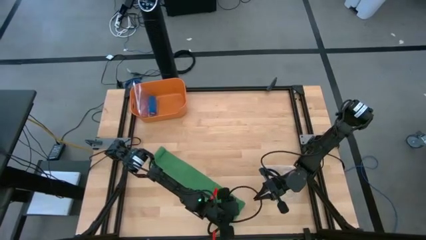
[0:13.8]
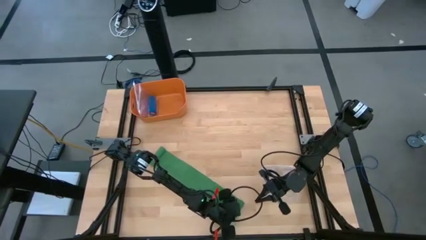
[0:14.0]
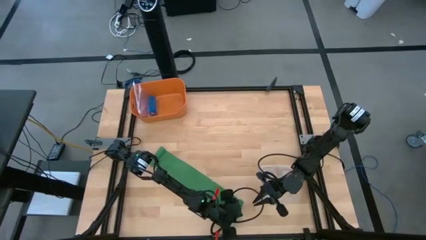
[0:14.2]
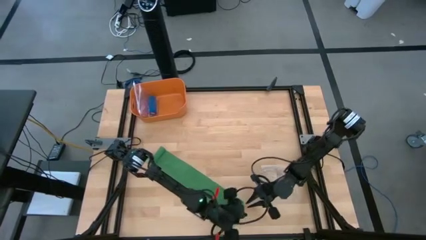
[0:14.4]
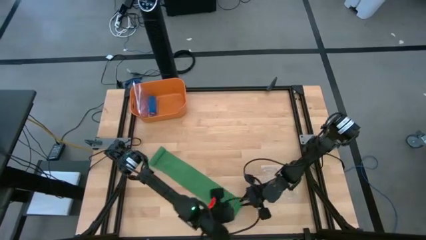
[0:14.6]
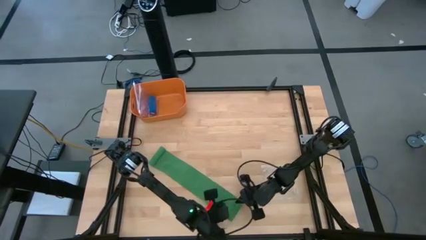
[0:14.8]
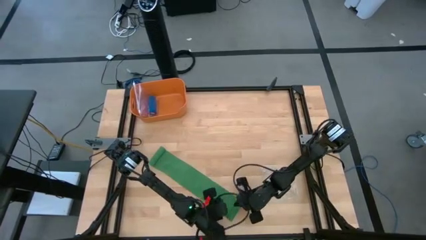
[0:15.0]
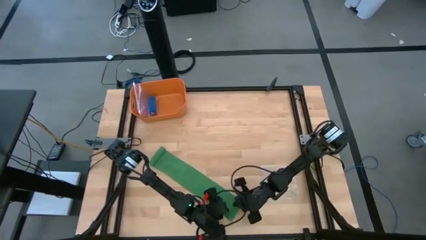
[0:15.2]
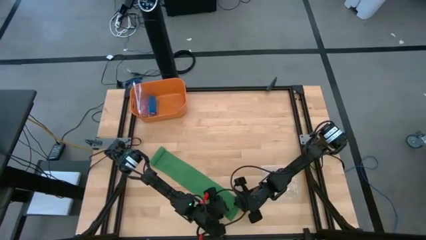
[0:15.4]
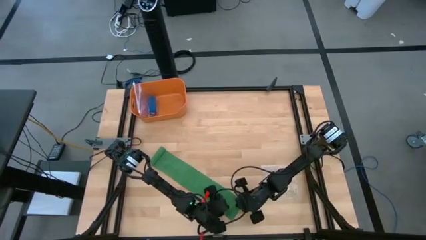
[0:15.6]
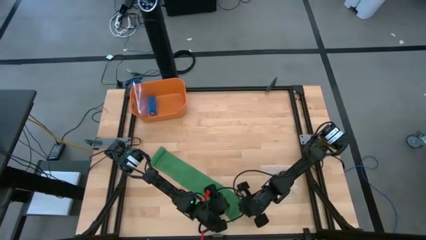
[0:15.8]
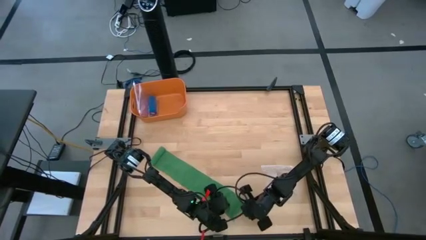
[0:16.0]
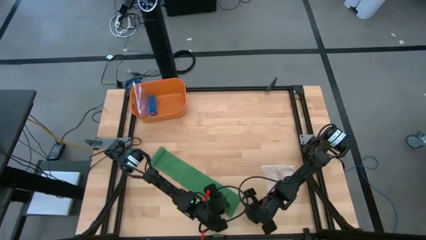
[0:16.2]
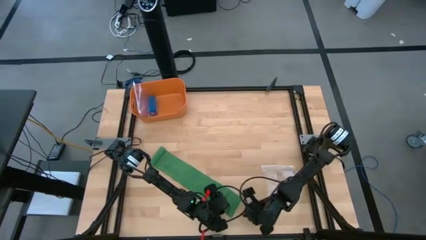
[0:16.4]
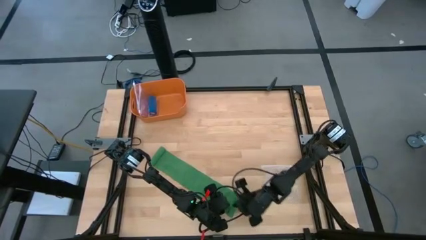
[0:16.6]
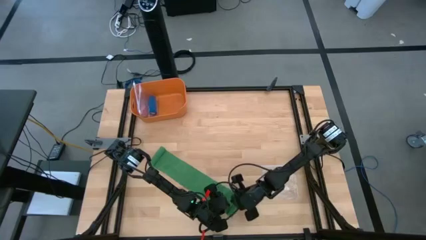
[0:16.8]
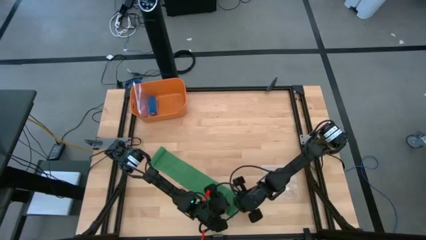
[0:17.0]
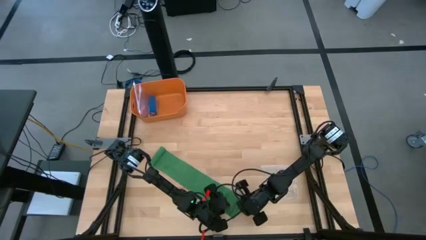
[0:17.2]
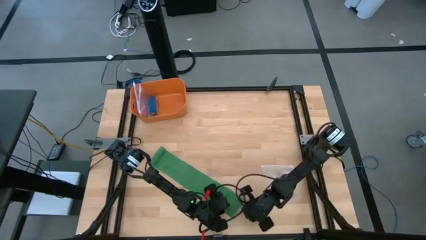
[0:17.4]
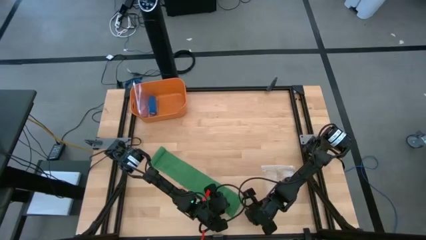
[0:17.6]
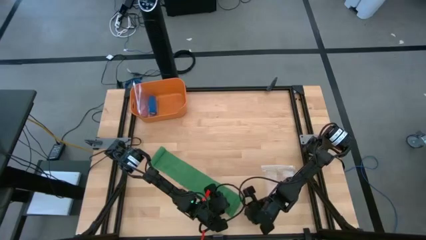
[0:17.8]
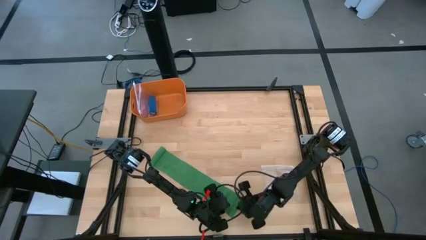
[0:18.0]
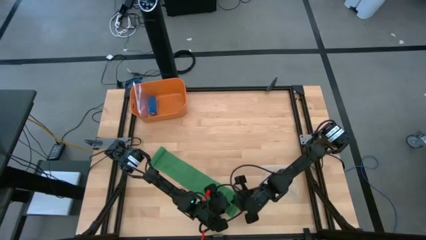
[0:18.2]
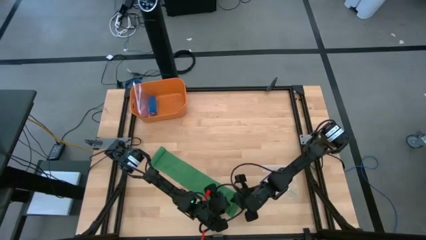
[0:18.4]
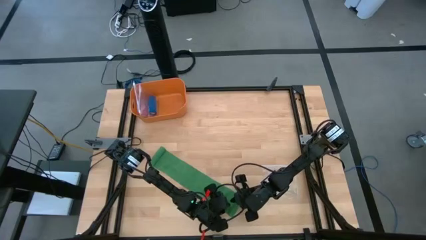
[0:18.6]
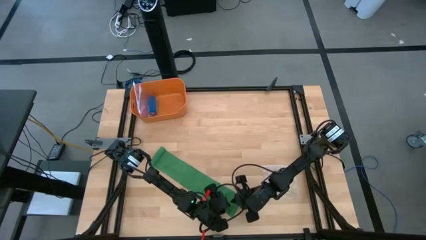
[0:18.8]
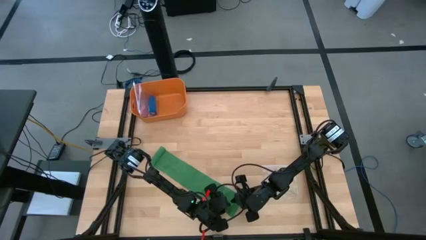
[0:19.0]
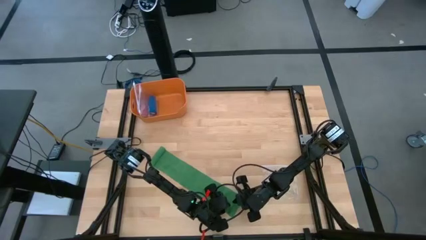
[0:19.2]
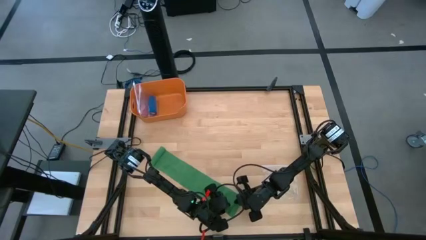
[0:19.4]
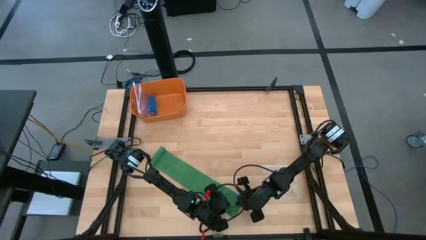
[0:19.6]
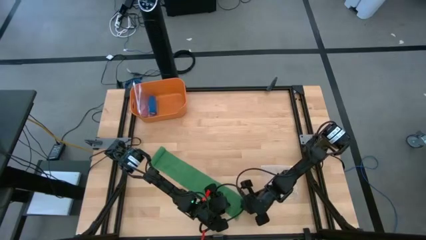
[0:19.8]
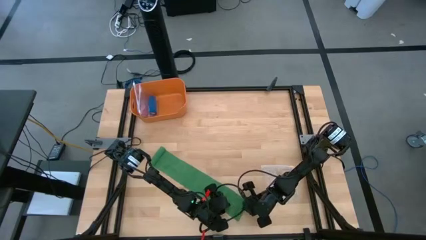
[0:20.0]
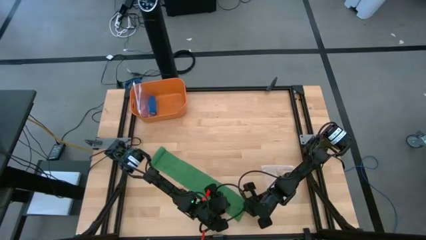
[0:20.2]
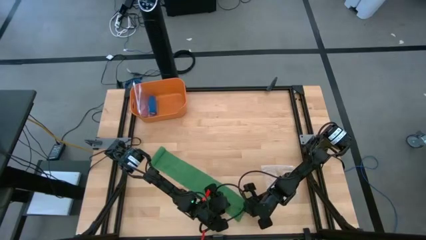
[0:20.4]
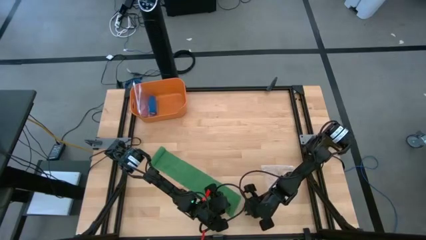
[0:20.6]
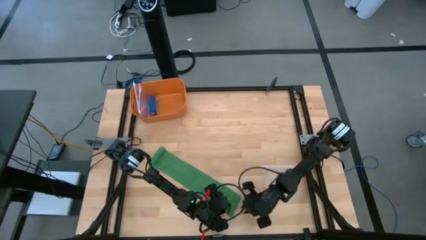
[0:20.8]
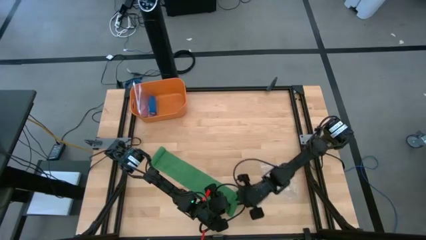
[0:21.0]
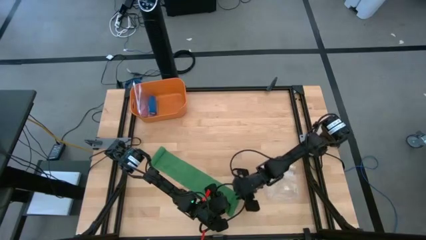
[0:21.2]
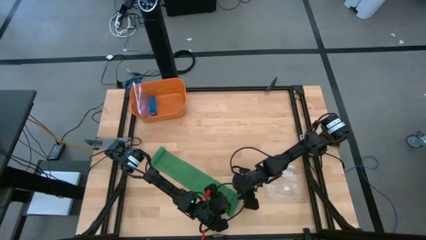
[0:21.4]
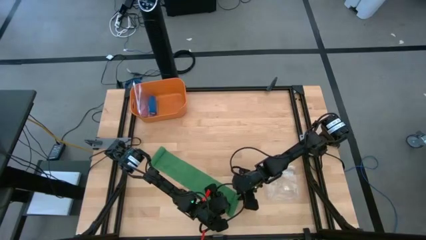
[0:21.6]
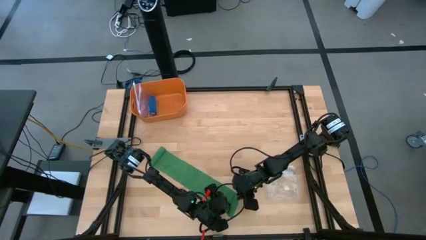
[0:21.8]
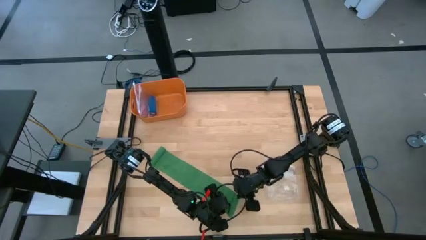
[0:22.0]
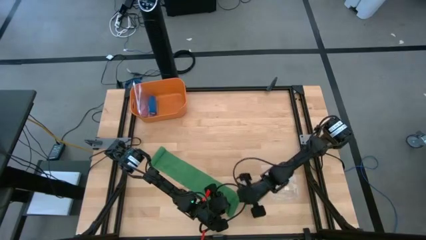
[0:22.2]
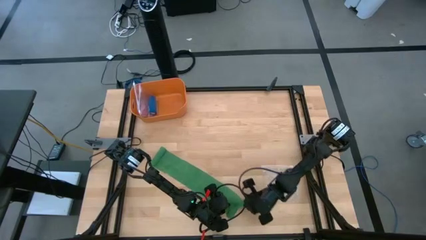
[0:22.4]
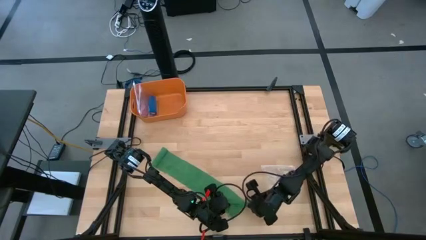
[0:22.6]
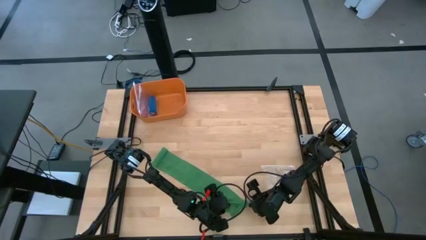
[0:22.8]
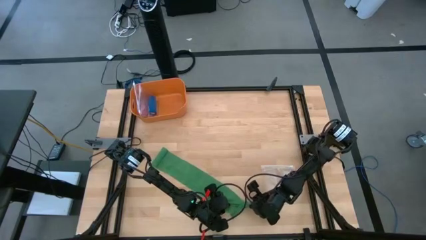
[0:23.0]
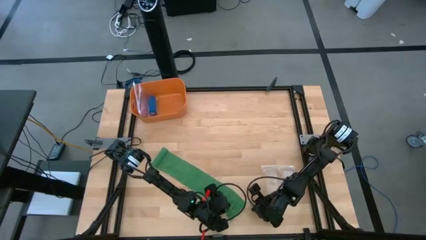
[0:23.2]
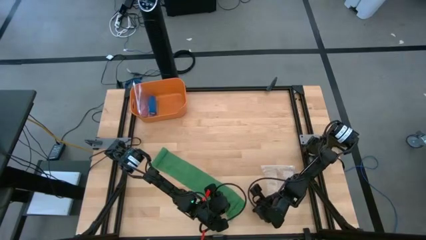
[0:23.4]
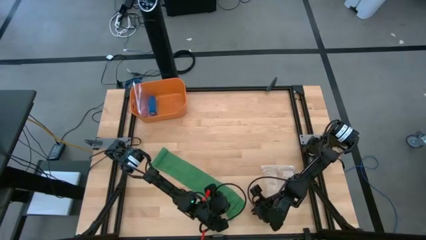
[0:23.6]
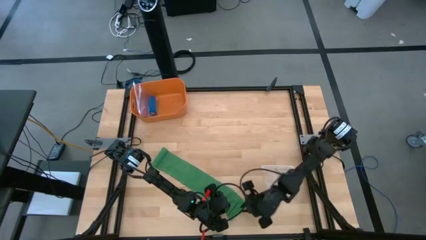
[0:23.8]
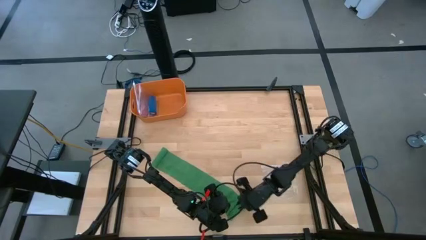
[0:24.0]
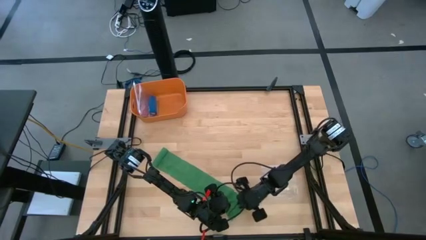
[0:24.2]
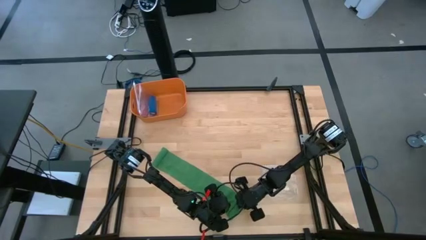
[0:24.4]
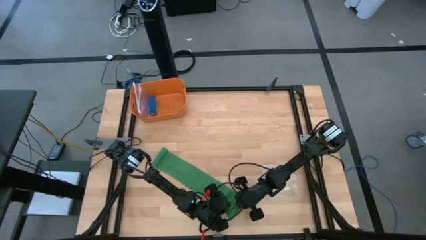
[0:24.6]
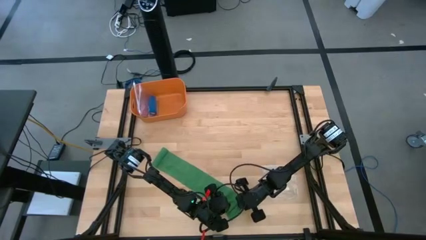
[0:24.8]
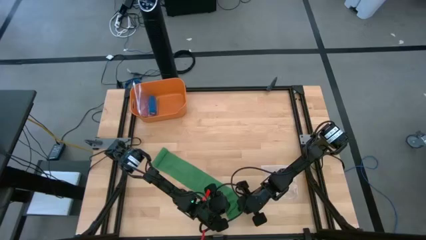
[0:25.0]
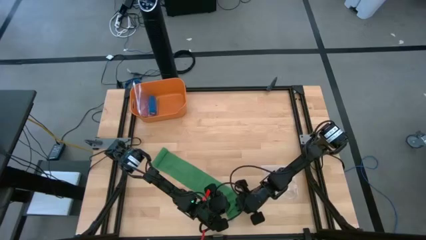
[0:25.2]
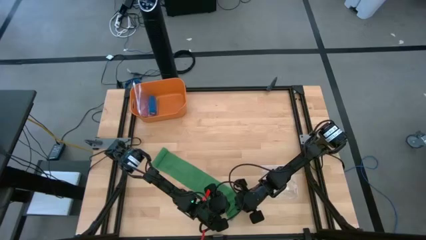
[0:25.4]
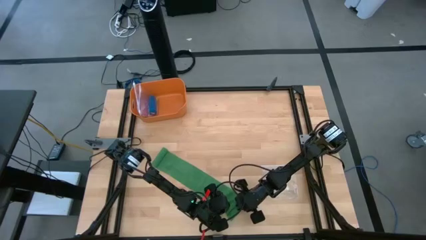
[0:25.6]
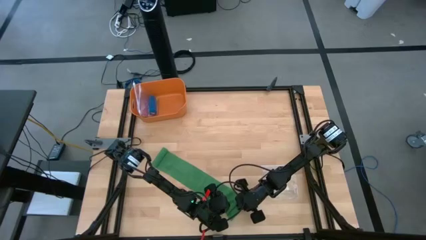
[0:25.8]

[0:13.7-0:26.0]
Task: Roll bandage
Roll the green bandage

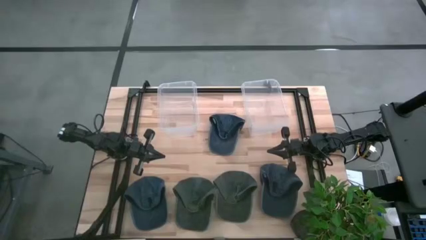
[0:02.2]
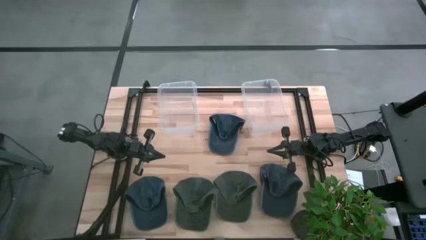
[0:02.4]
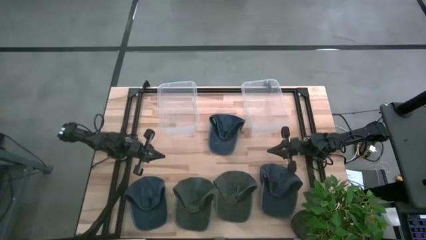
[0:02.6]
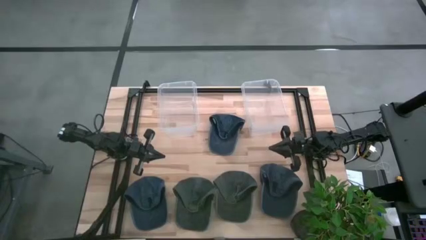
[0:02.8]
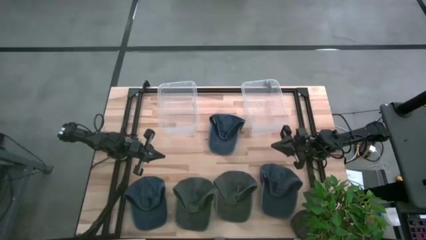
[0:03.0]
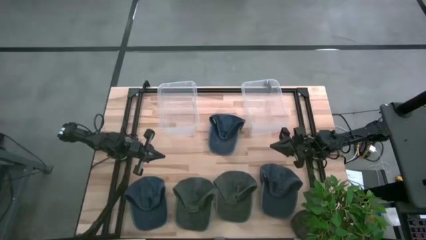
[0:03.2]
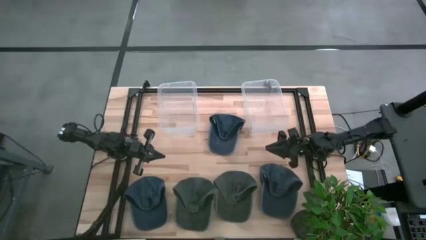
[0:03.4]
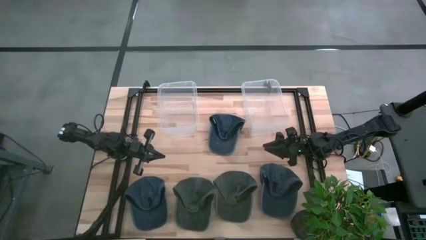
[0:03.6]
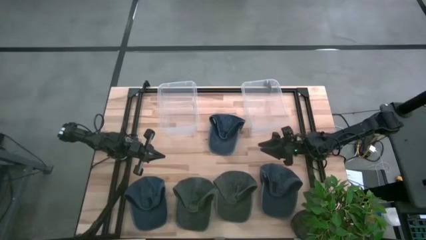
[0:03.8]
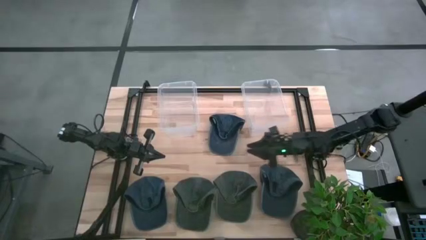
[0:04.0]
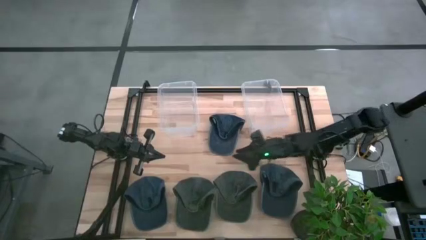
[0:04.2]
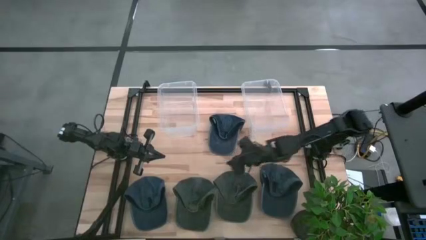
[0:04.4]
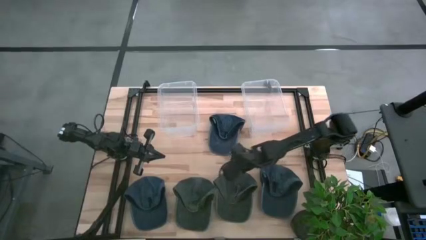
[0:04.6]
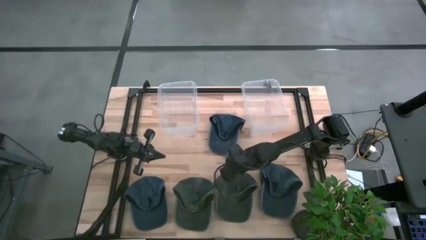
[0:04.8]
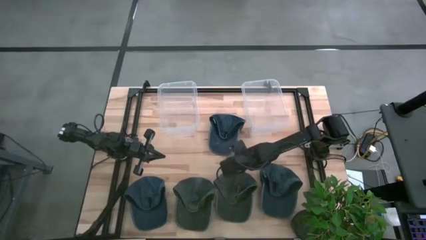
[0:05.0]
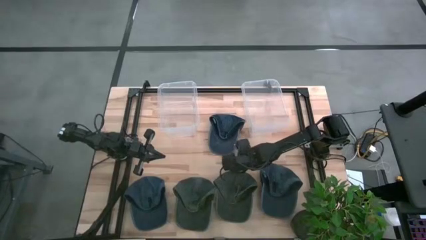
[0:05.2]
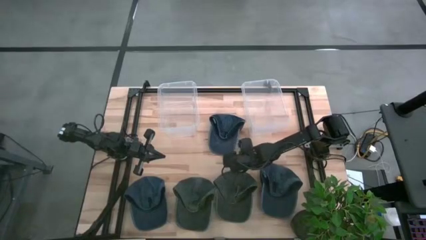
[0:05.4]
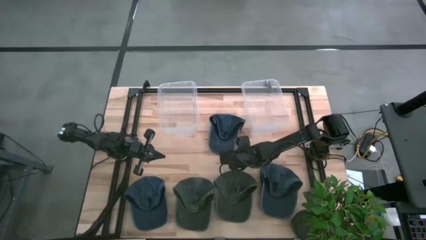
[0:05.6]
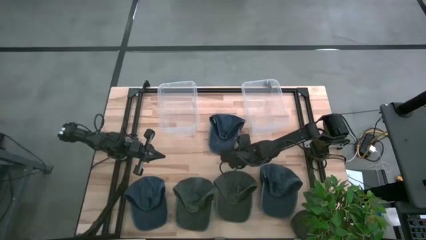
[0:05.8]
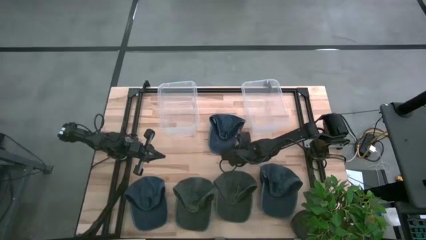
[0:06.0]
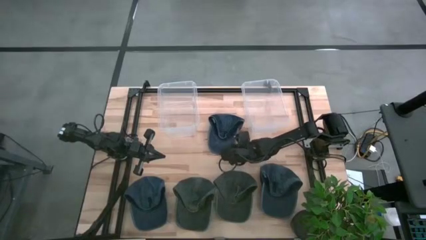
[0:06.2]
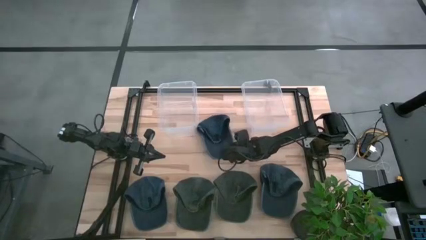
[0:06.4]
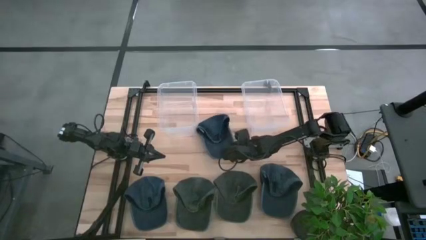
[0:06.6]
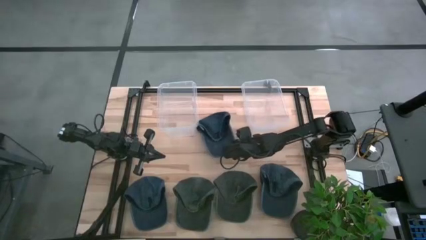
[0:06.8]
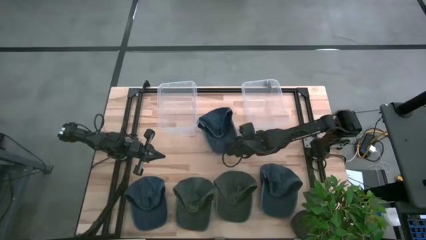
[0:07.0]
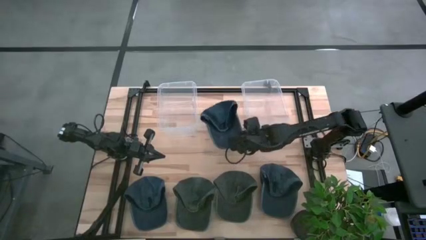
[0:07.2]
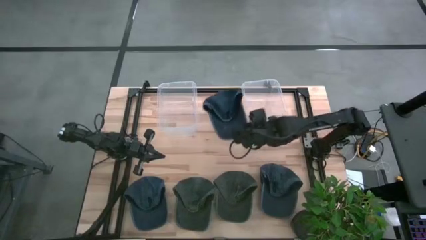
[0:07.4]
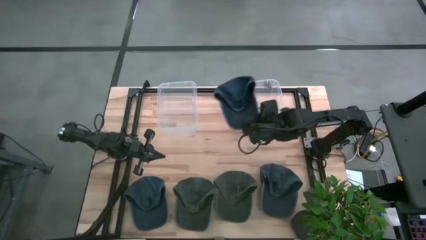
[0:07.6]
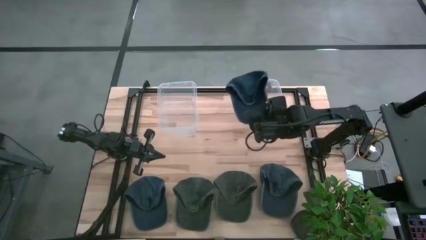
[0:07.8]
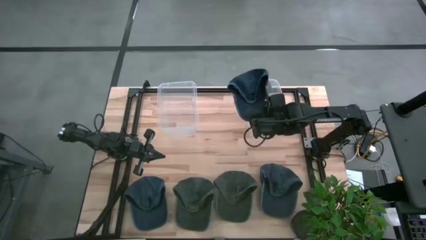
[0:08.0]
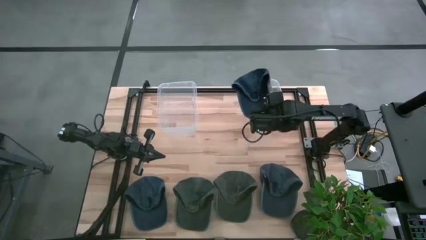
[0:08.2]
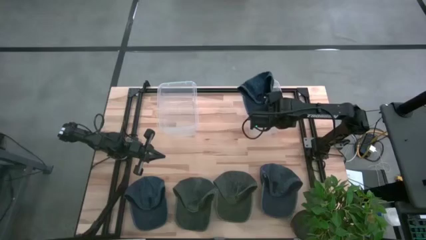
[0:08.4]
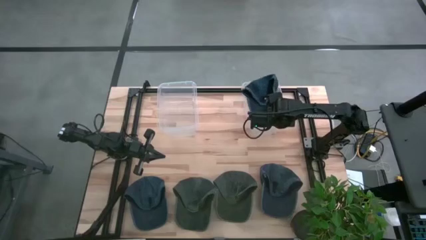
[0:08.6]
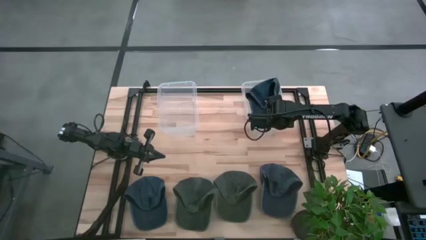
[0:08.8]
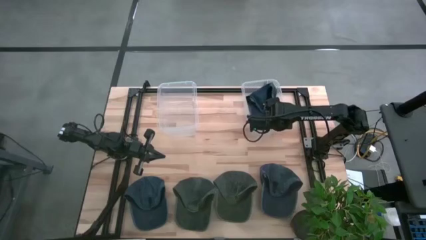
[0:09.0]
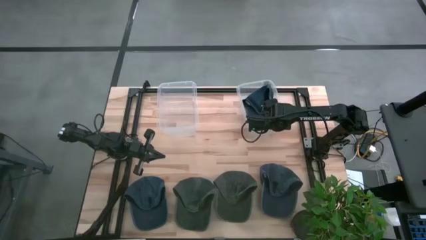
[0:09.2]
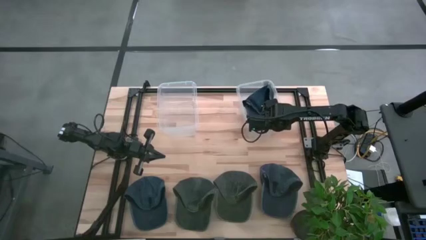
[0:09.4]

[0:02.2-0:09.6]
Task: Pick & Place hat
Put the top blue cap into the right transparent bin
